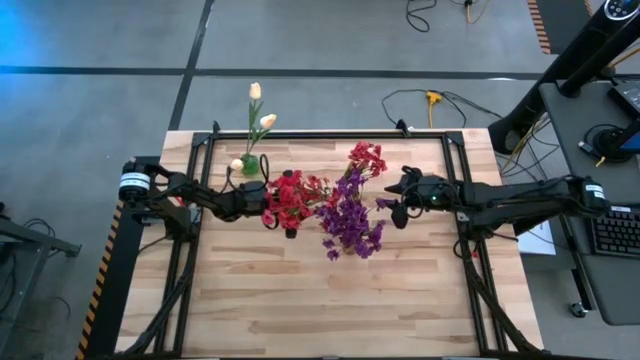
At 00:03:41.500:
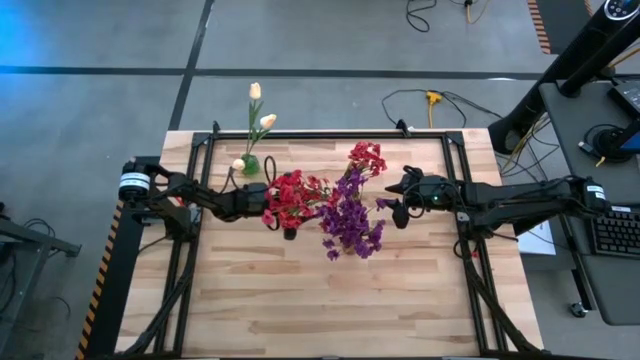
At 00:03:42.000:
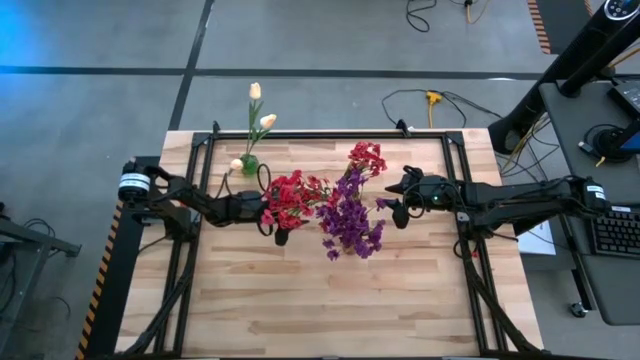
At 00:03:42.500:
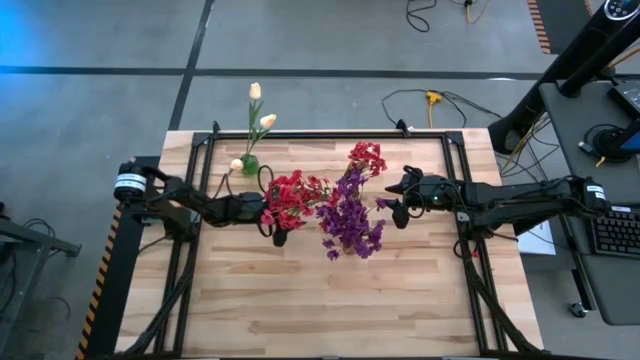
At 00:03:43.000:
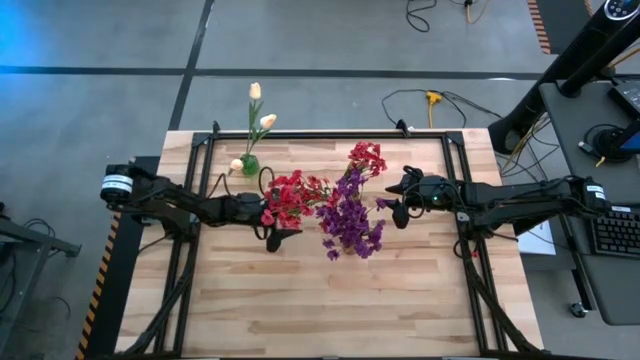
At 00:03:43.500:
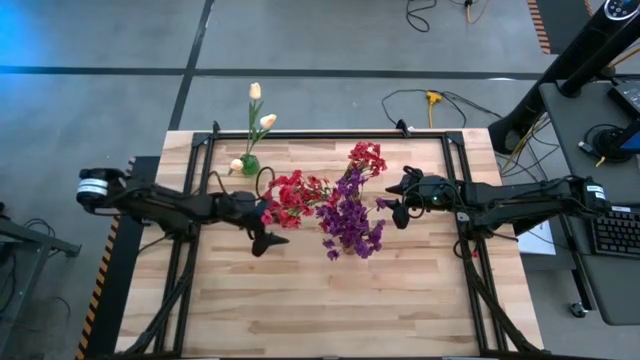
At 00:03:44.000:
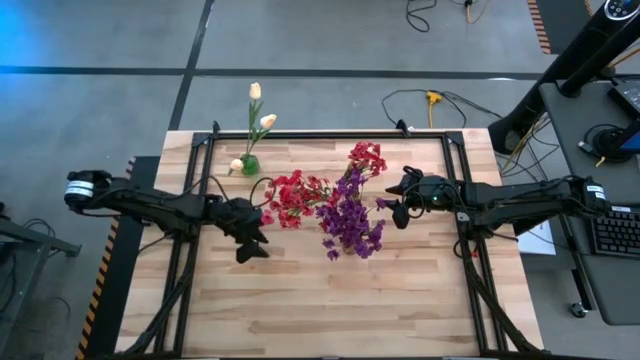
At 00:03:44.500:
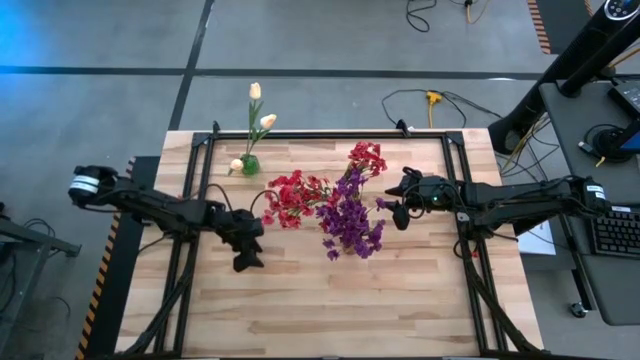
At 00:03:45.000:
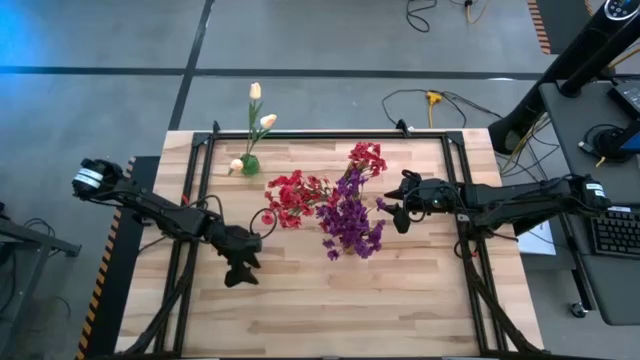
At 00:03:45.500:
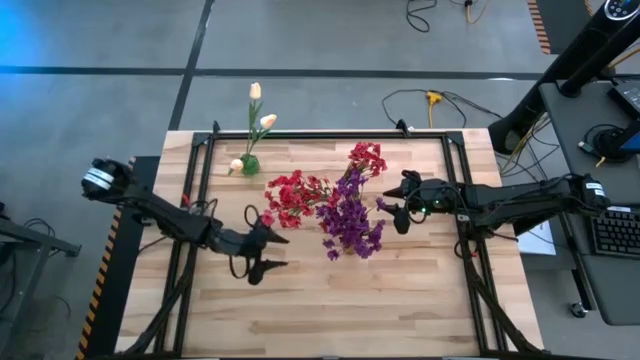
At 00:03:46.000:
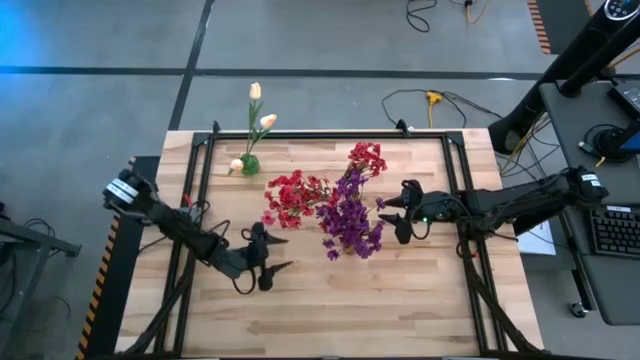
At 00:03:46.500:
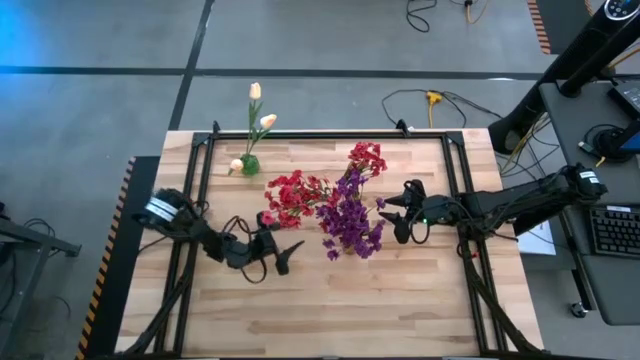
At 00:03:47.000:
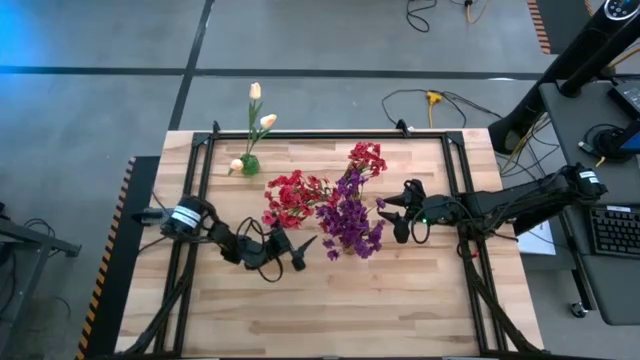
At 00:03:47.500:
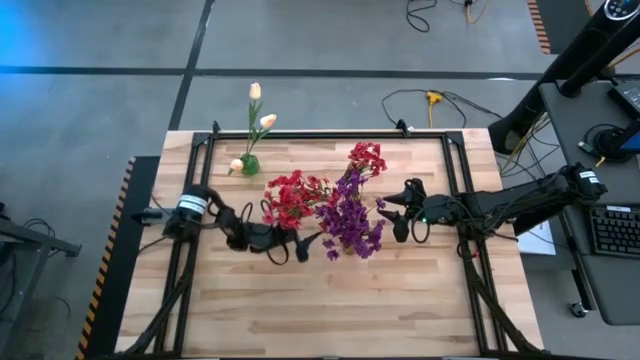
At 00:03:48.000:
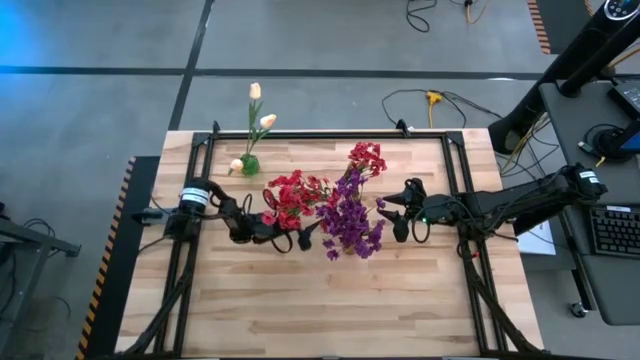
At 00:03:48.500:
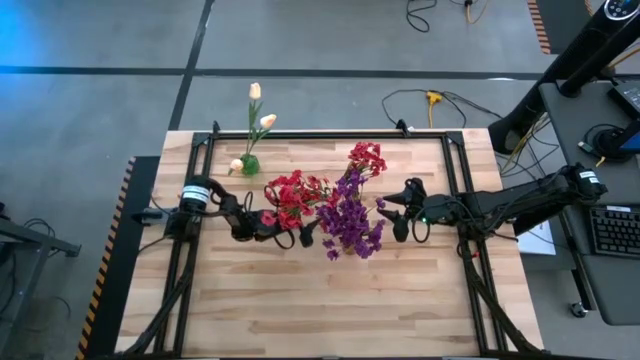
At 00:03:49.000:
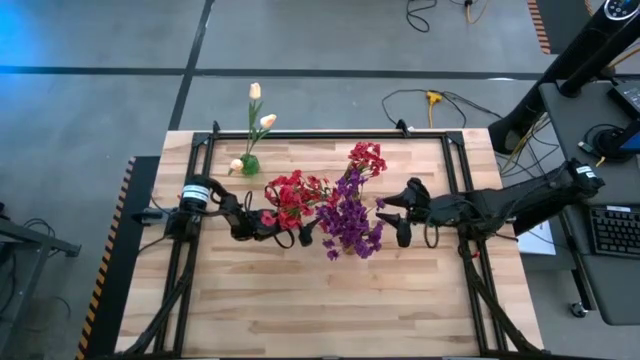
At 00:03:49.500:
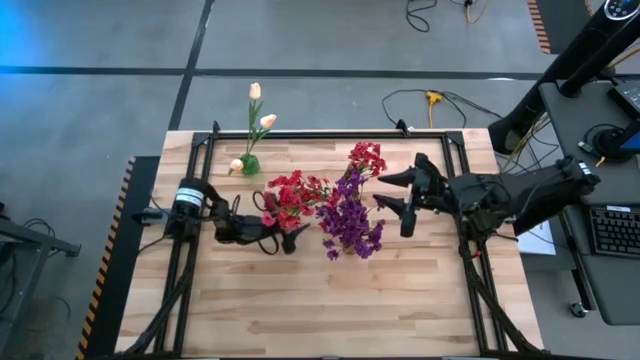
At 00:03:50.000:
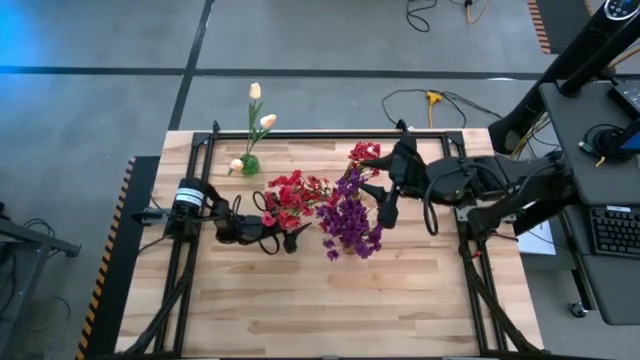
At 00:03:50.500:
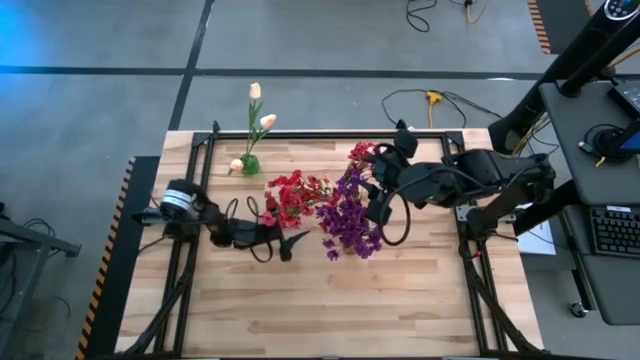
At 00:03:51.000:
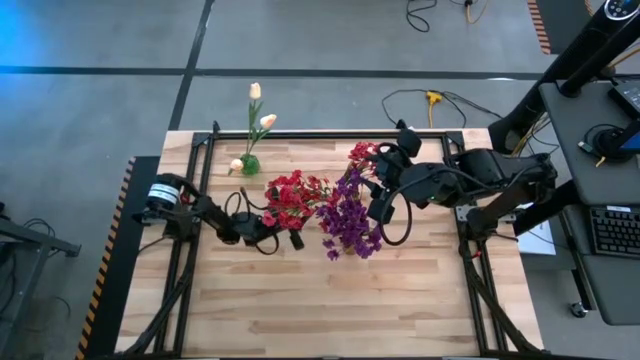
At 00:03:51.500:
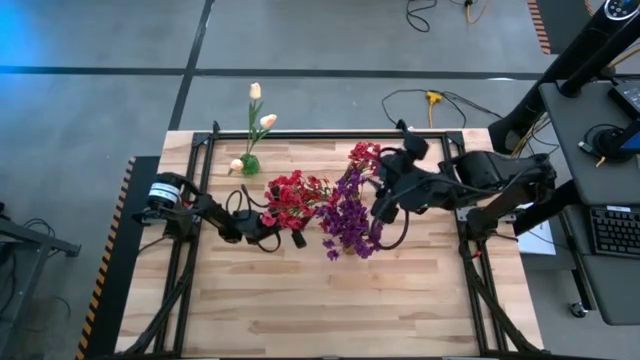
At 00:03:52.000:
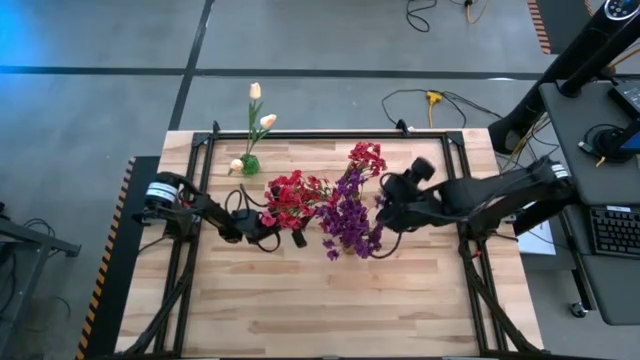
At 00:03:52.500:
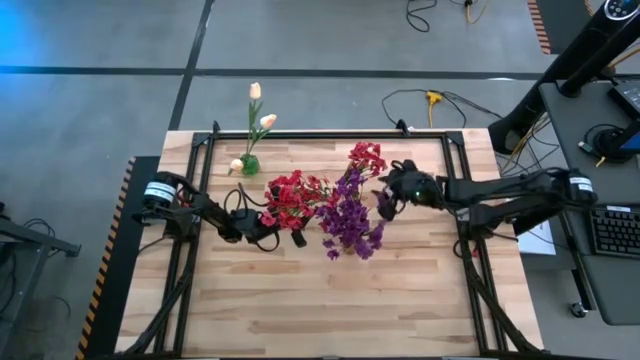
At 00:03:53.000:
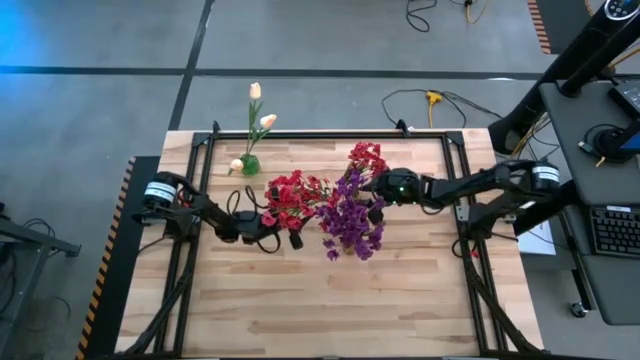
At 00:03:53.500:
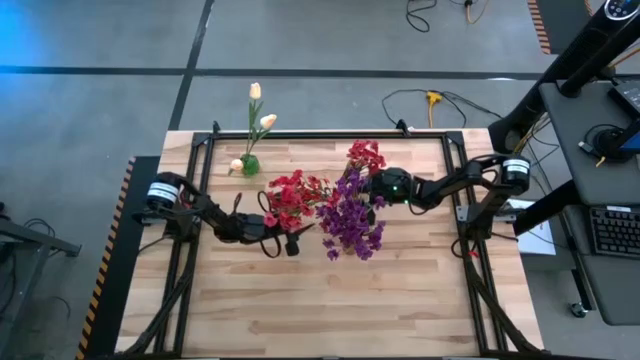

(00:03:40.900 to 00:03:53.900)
Task: Sort flowers into vase by color
Adjust the transparent vase

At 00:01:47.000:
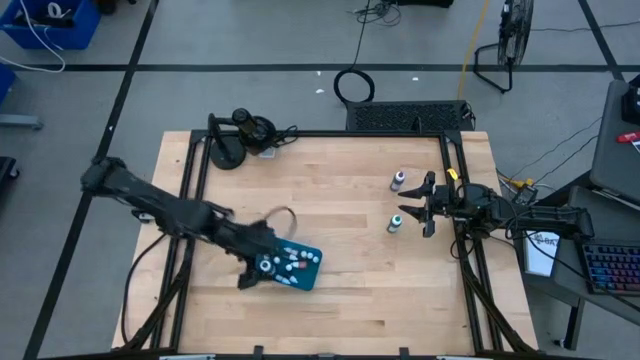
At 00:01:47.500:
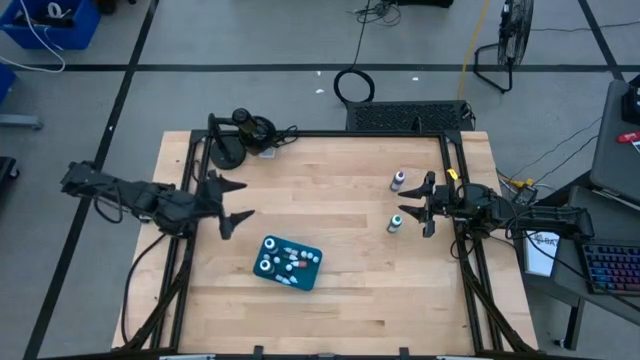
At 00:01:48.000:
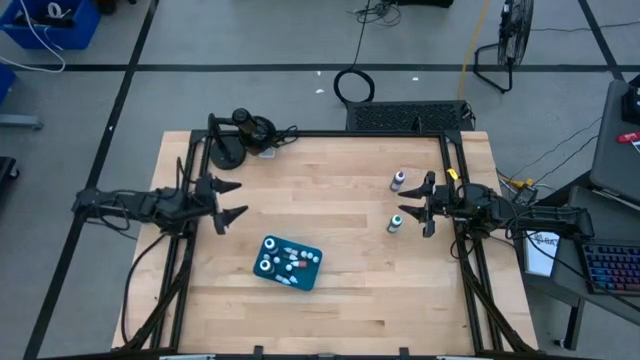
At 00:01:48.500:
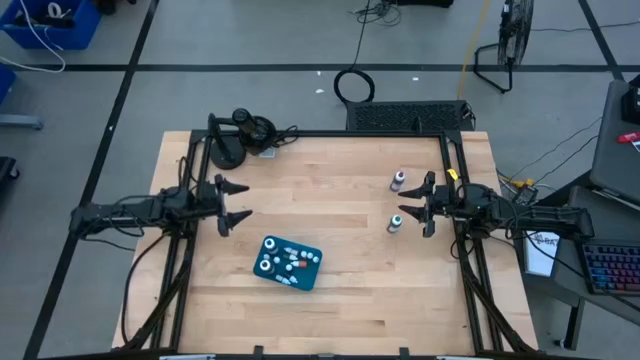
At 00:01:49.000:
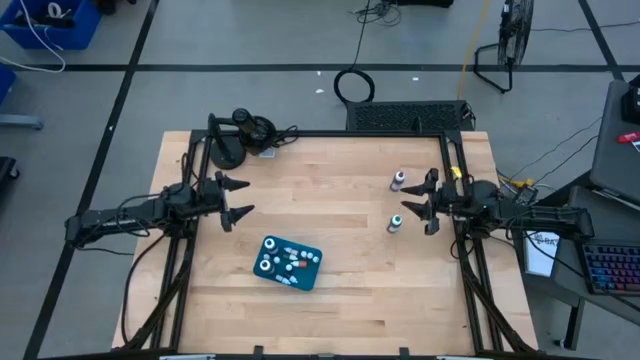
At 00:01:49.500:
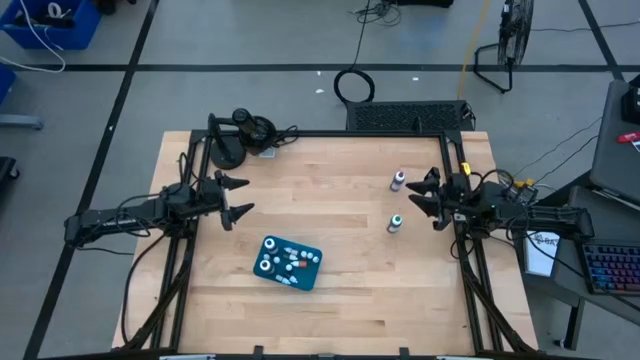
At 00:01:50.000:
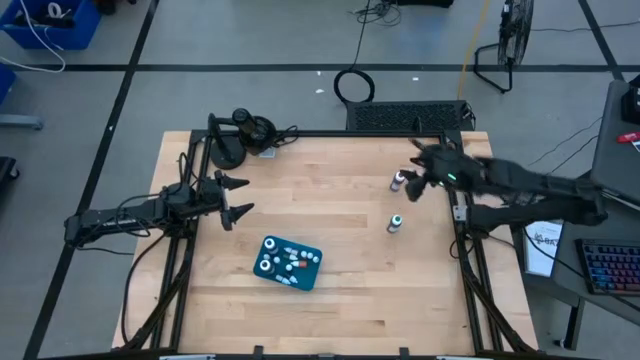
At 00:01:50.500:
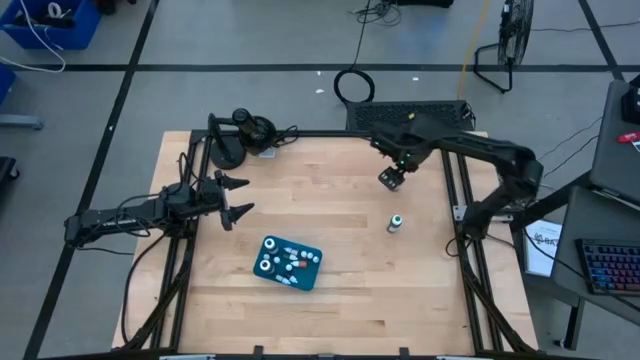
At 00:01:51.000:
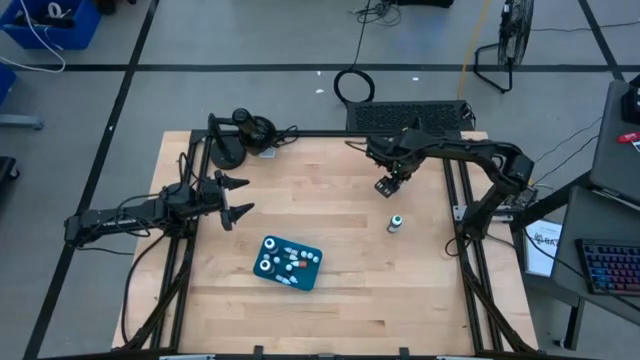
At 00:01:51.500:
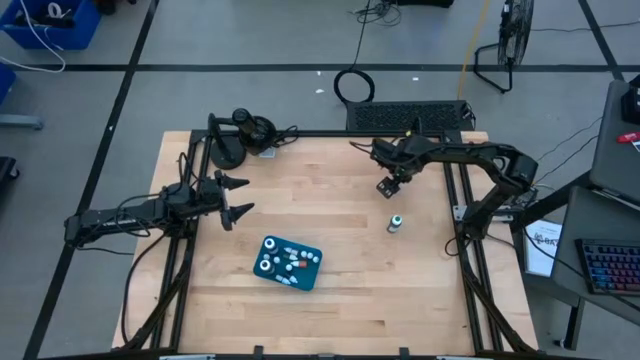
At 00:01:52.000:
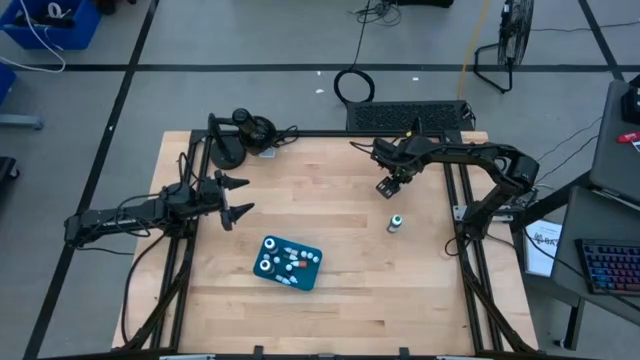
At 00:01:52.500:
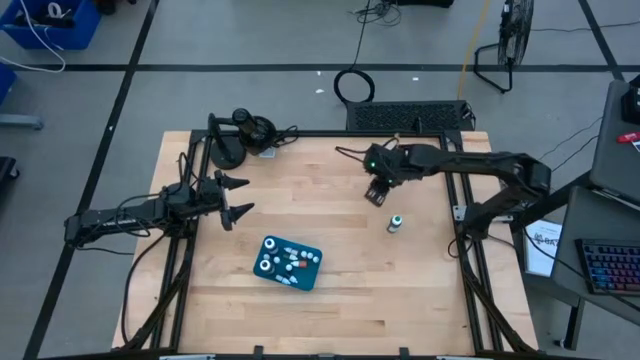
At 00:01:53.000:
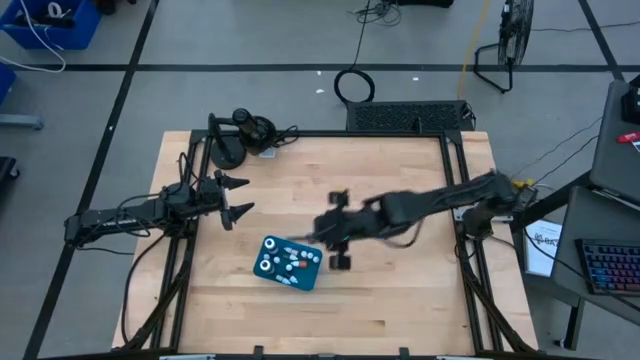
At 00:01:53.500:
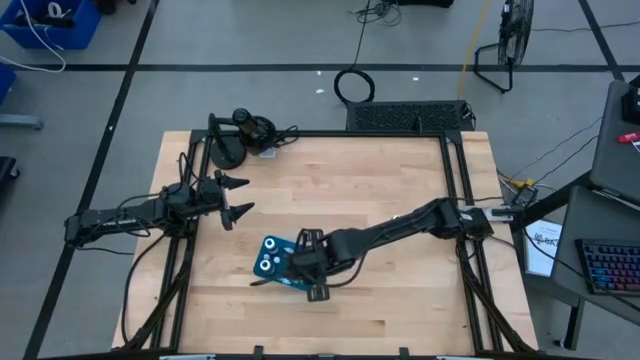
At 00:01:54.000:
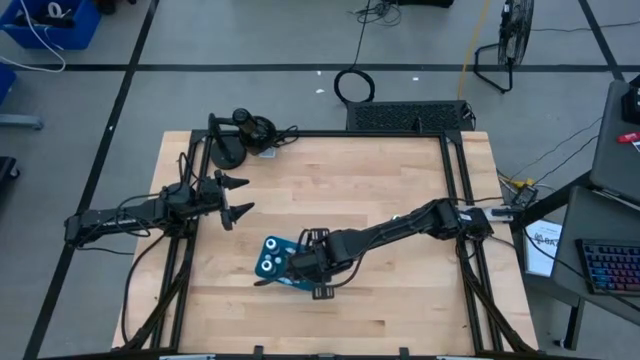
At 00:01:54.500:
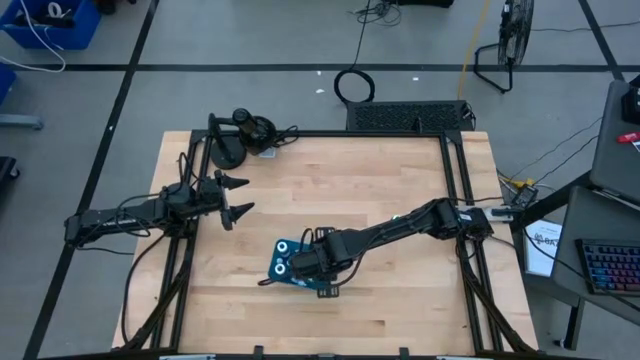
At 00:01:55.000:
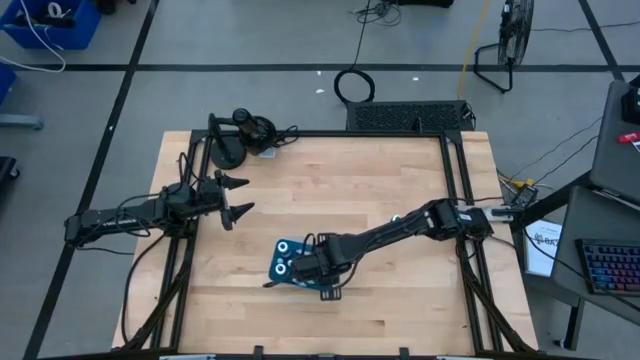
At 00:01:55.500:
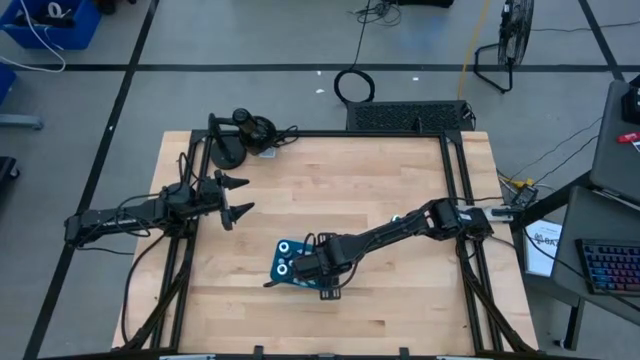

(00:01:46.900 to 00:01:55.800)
Task: Pick & Place food coloring
Put the large purple coloring bottle into the blue bin
